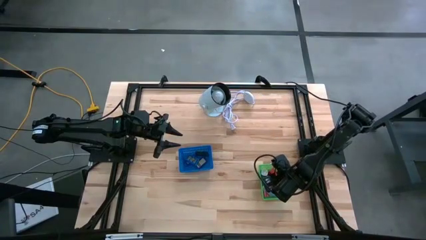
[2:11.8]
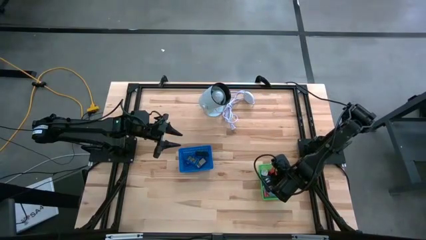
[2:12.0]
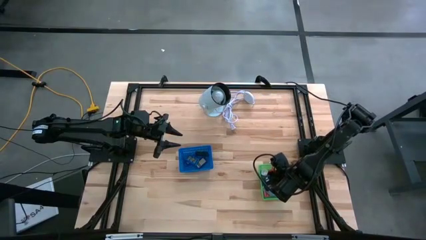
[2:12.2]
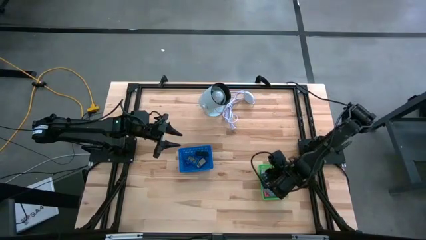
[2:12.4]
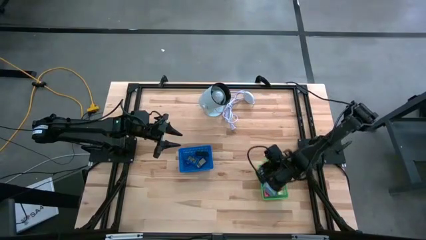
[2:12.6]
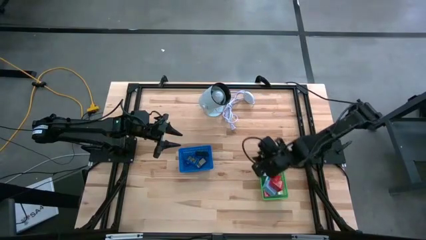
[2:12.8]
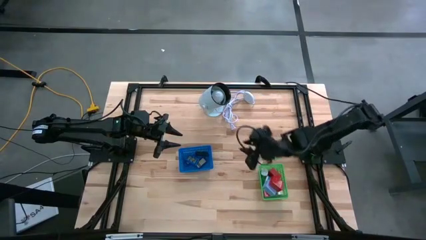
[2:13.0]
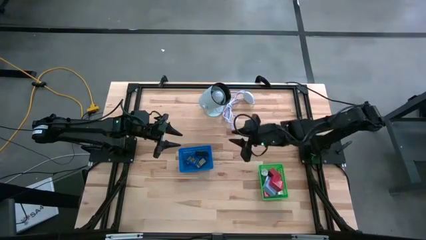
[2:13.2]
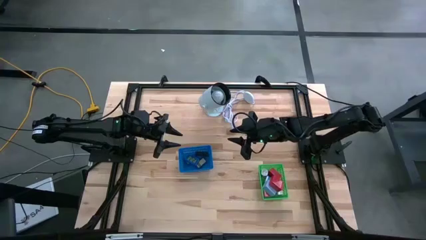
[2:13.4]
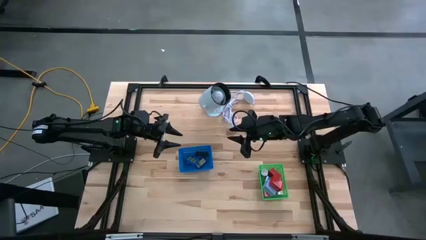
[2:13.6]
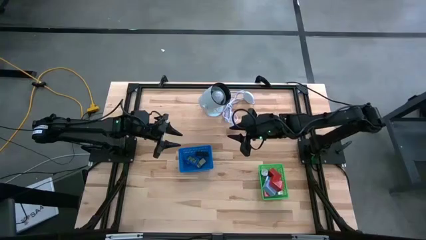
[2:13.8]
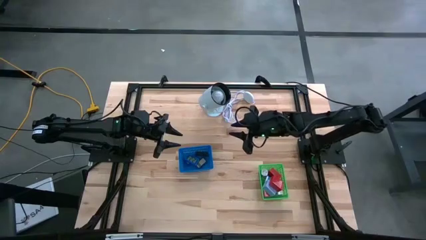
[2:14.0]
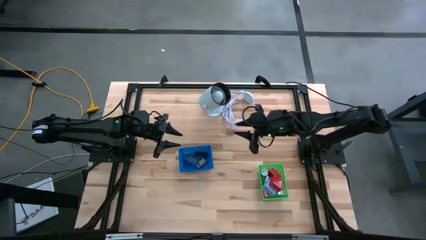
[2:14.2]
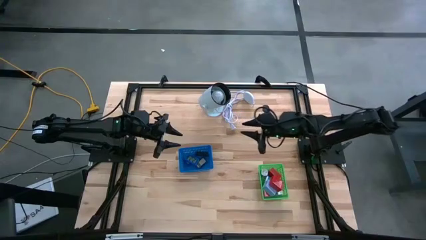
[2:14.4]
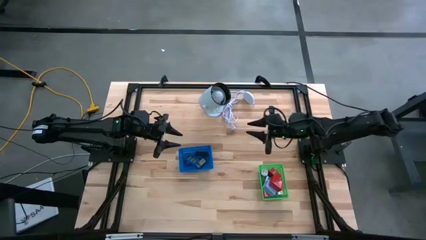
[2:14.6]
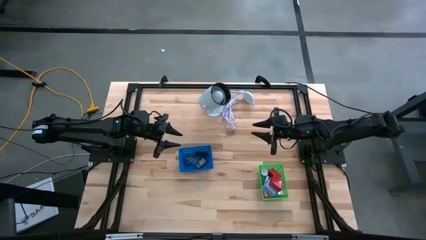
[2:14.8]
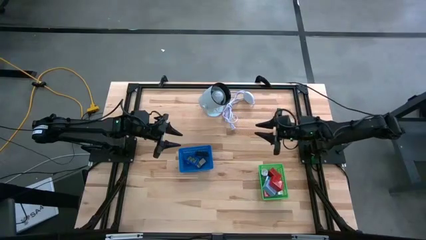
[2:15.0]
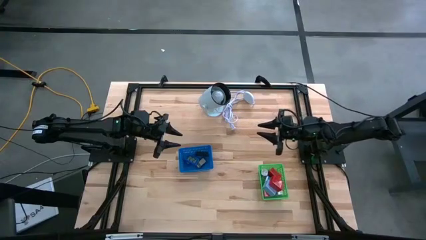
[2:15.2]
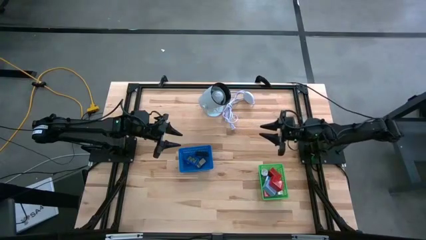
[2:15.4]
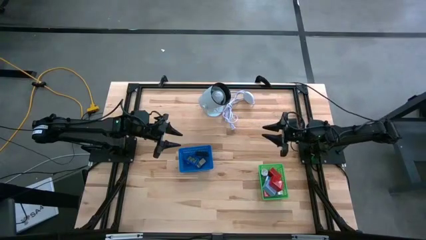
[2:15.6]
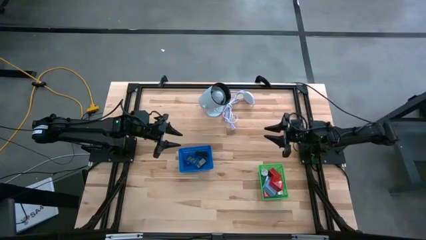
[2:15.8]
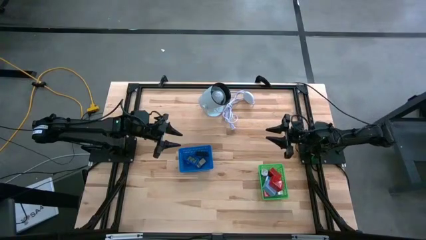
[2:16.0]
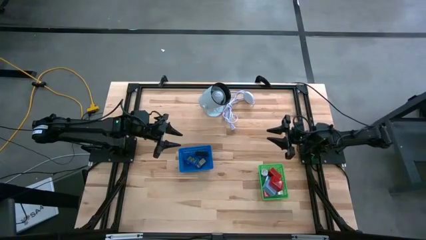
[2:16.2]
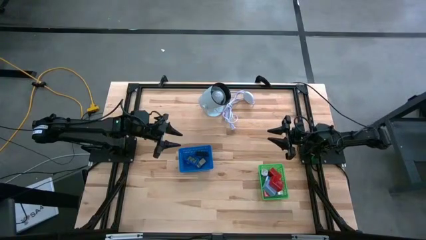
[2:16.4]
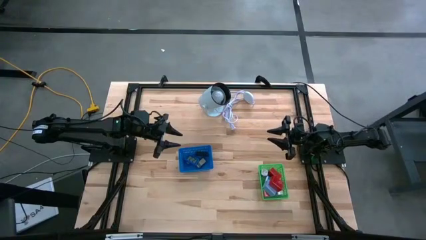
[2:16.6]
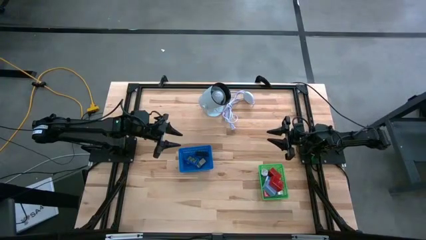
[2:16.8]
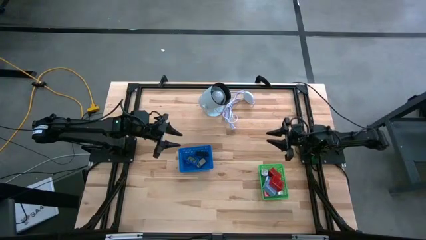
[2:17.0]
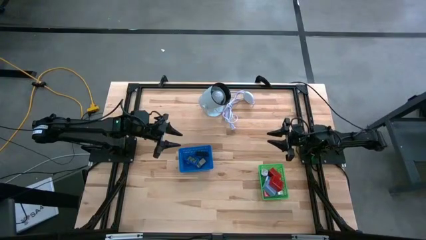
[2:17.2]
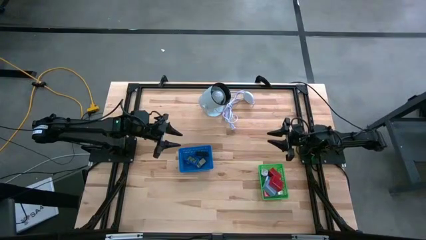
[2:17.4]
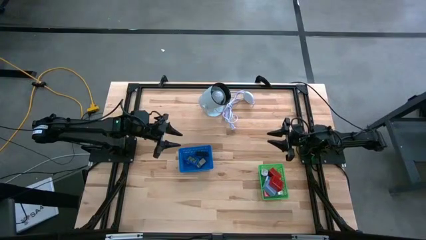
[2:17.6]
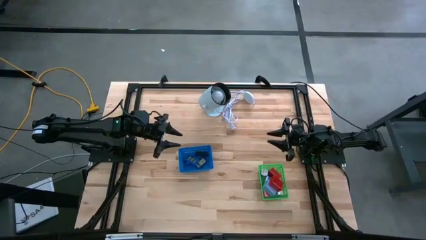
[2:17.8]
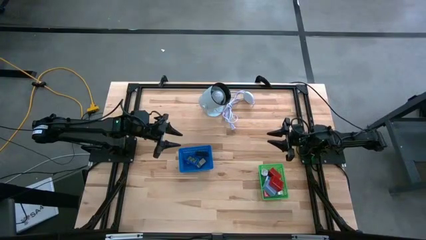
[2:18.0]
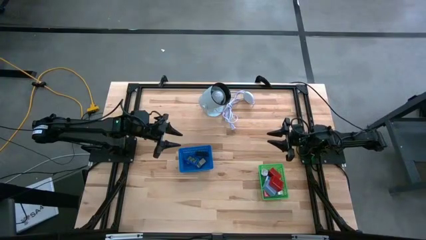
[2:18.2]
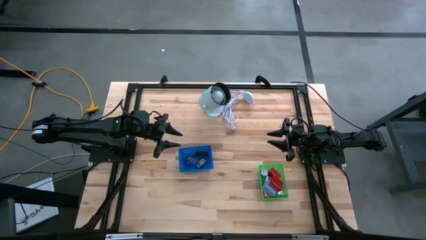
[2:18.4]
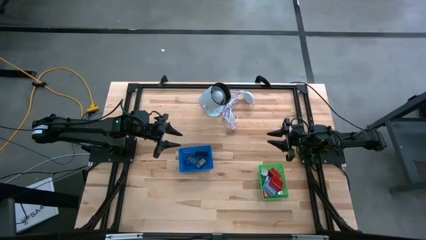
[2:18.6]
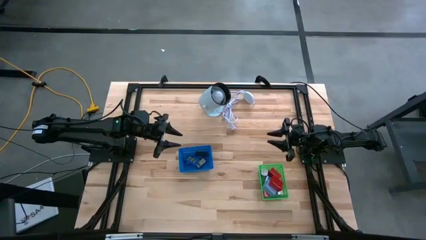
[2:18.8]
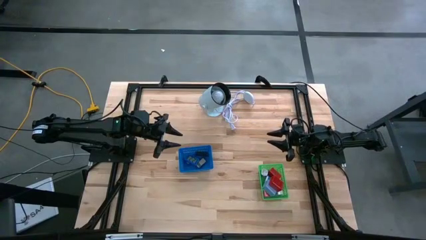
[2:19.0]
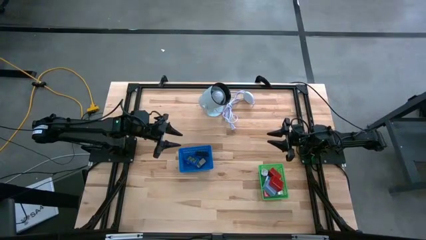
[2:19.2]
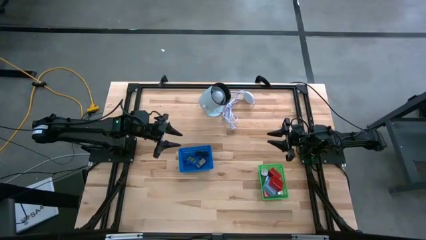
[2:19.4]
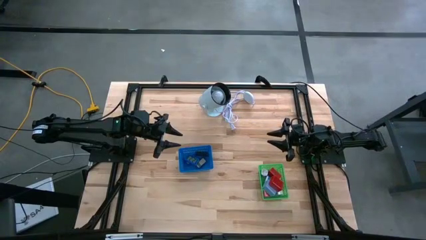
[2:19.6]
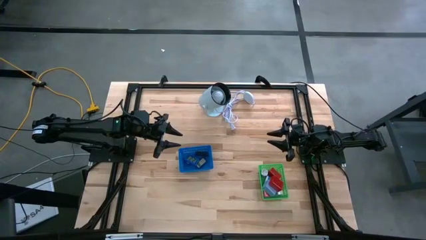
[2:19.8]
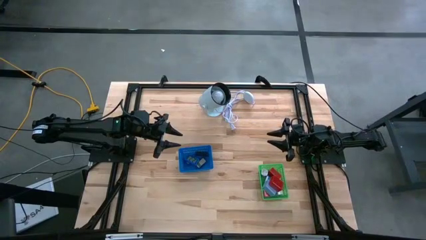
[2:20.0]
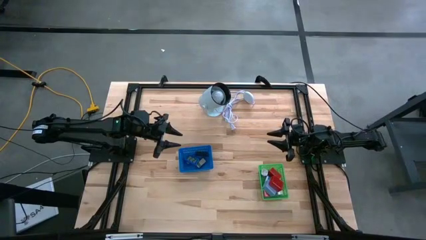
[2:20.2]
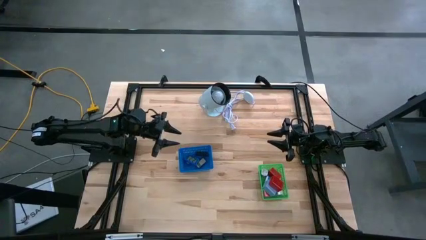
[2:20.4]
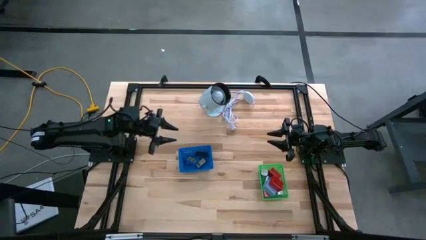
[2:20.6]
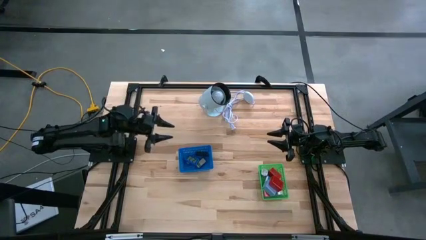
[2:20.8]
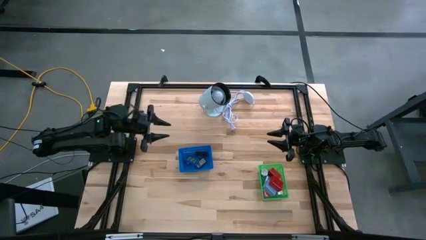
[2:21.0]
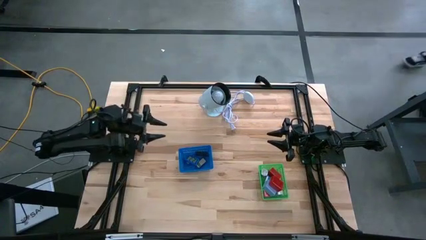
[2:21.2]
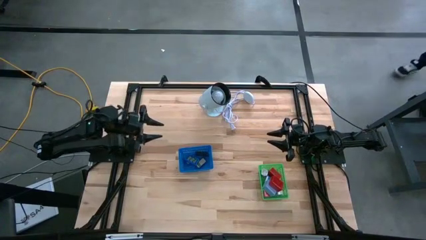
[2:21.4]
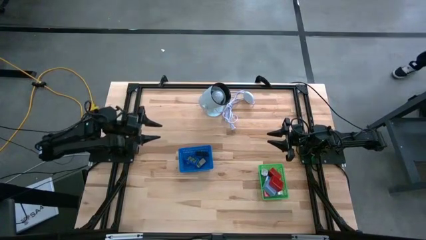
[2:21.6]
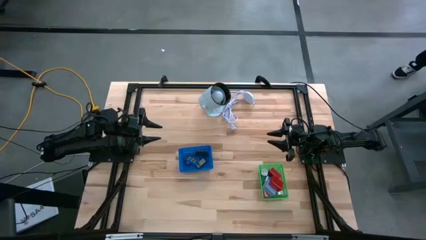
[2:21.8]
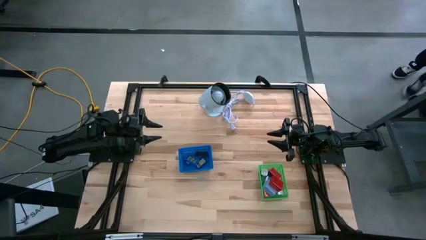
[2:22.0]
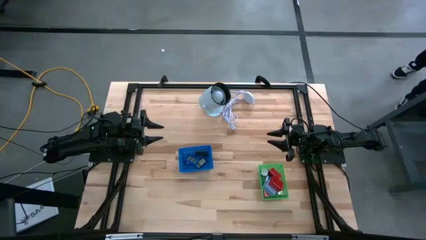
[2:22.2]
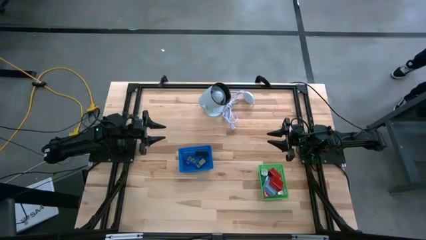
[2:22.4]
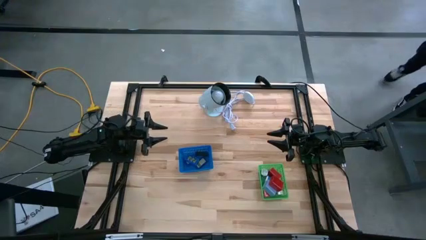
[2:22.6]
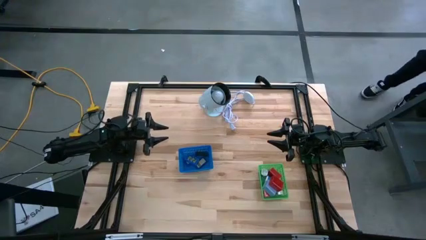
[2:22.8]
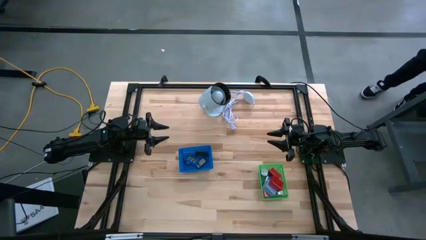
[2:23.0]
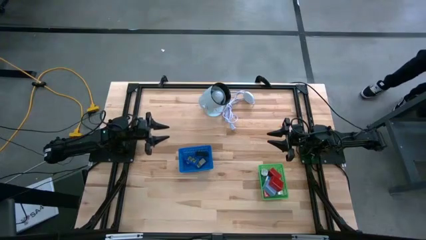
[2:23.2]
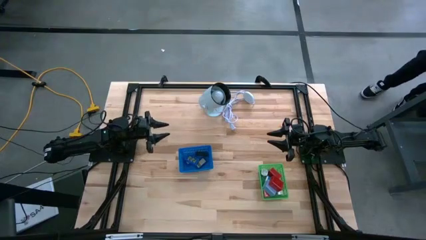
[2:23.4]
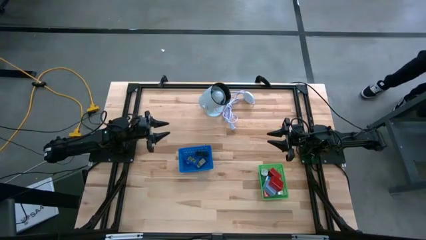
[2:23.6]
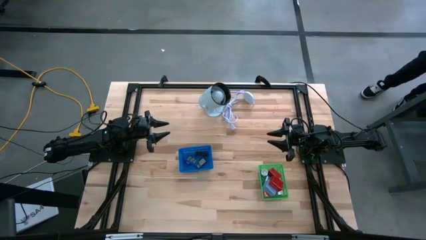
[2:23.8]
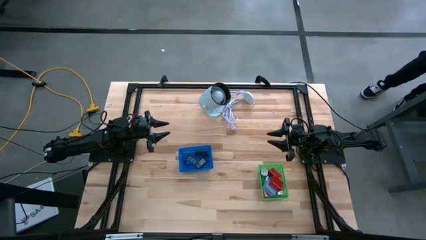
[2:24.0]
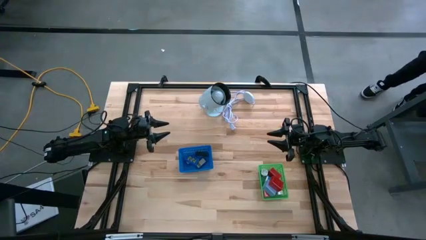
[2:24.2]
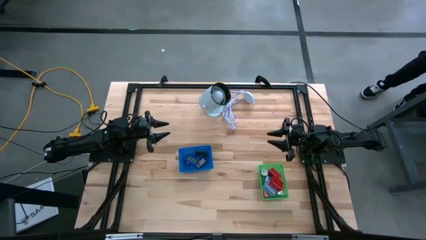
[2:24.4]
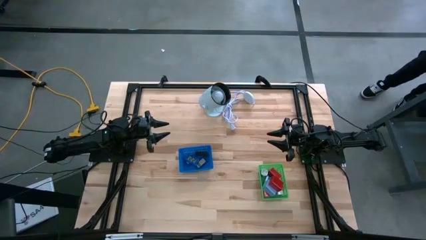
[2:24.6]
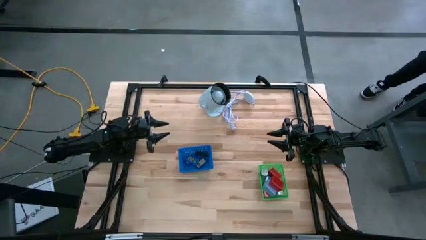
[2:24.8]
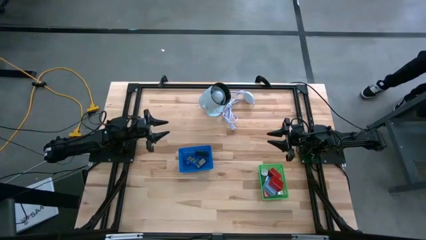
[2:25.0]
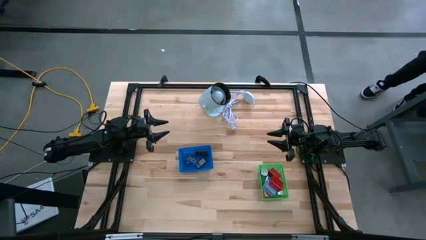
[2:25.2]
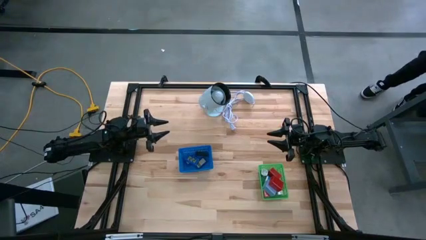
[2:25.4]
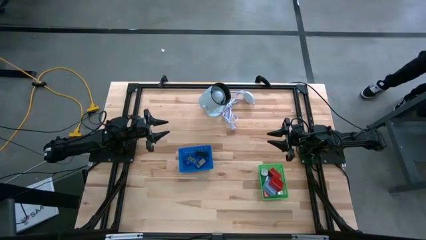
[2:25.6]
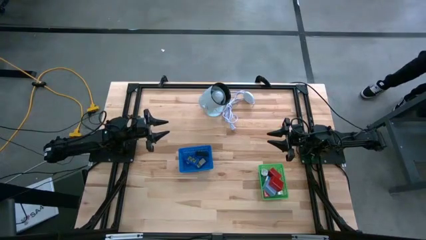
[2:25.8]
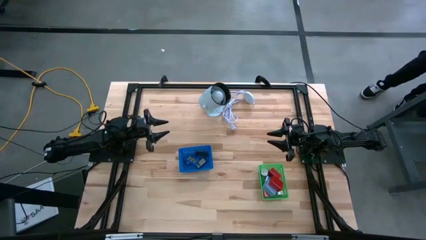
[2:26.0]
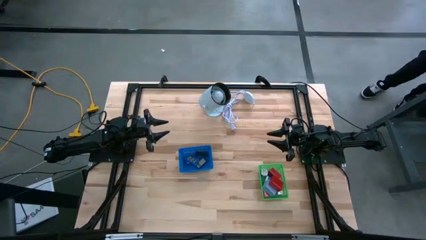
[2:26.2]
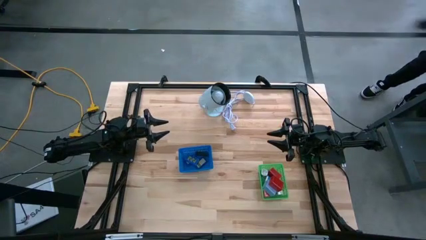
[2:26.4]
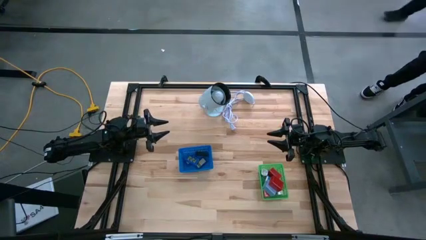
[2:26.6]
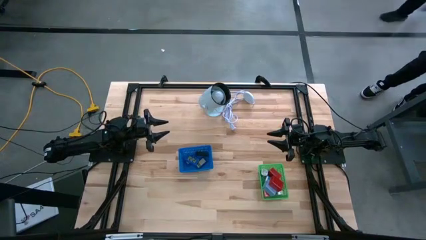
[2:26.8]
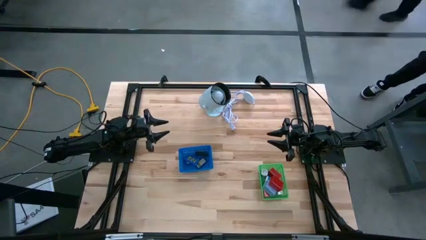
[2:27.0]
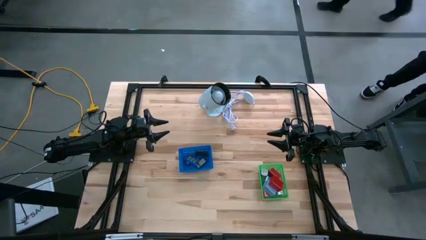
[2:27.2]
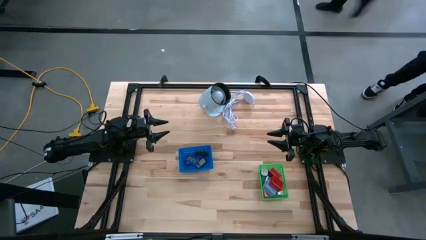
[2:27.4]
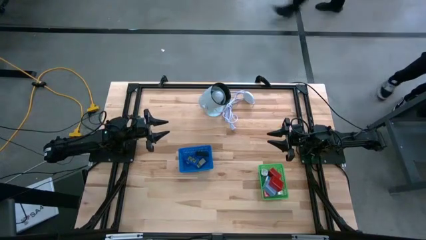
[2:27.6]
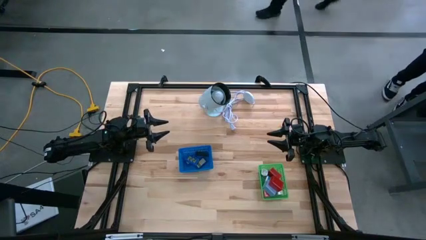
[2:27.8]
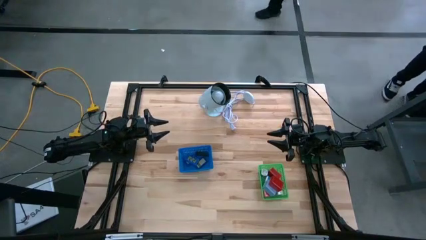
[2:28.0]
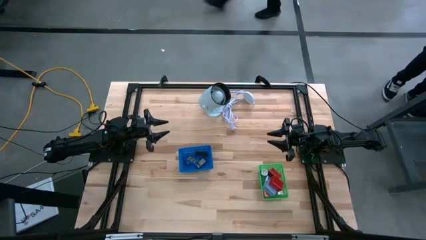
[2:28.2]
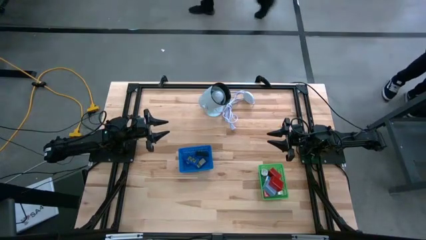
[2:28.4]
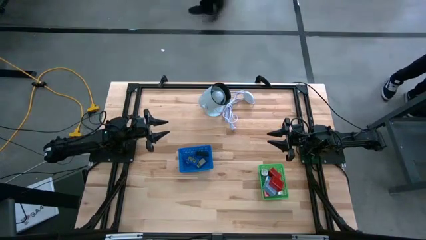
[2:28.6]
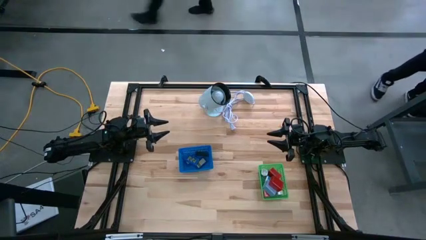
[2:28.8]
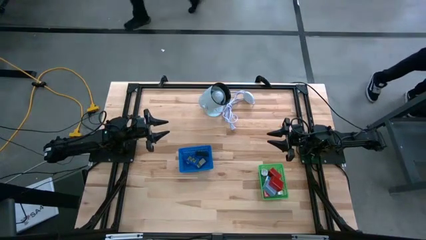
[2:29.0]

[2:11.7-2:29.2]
Task: Pick & Place Office items
Return to Home Position
